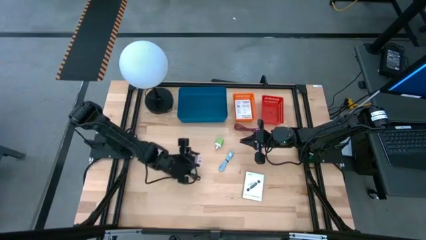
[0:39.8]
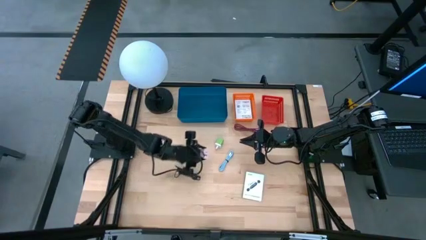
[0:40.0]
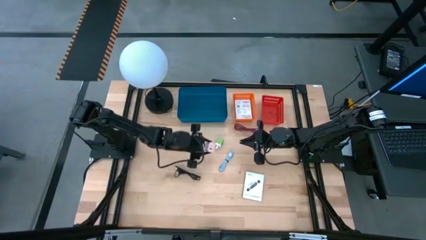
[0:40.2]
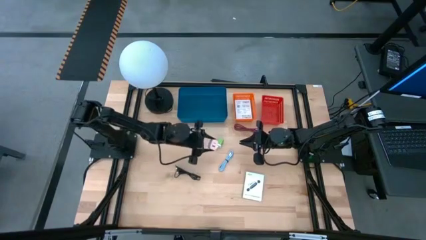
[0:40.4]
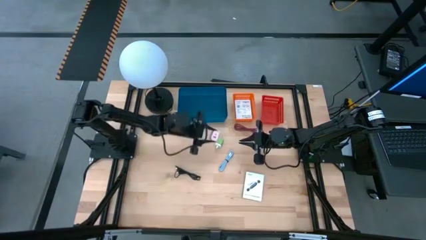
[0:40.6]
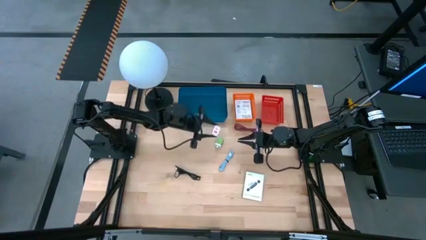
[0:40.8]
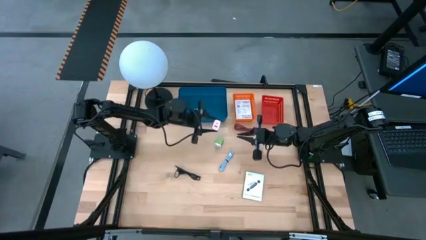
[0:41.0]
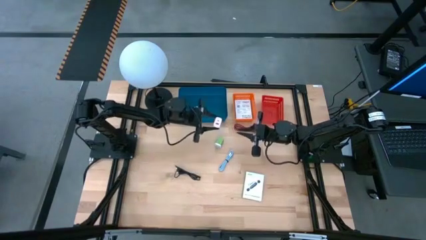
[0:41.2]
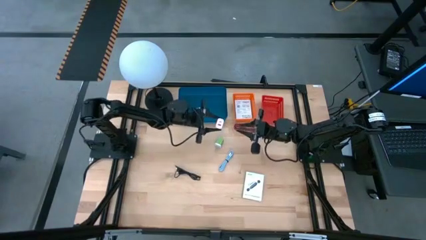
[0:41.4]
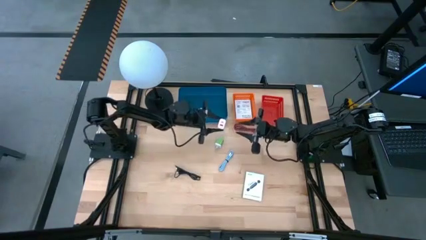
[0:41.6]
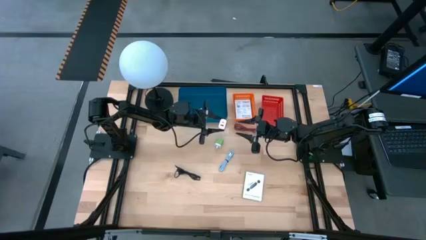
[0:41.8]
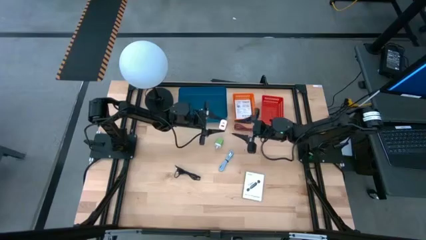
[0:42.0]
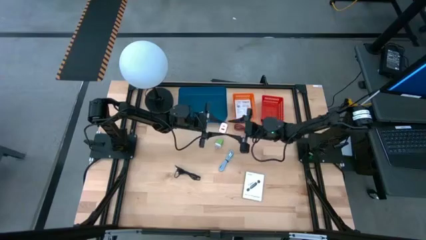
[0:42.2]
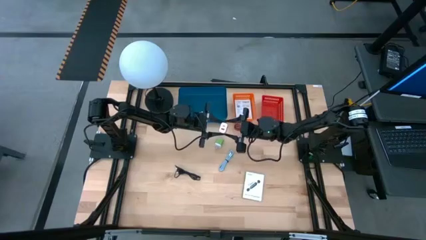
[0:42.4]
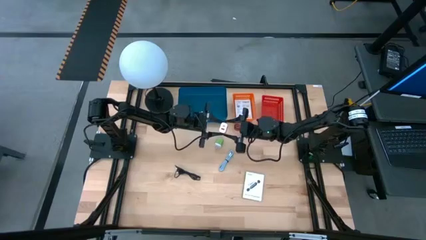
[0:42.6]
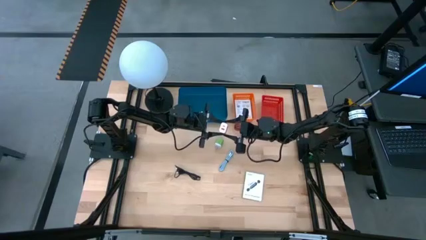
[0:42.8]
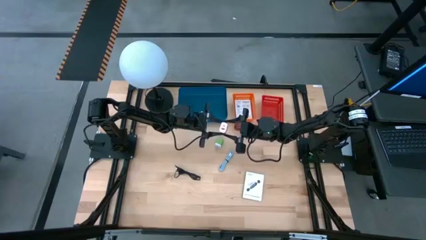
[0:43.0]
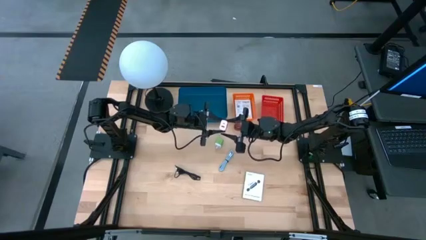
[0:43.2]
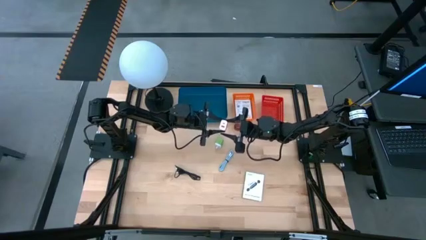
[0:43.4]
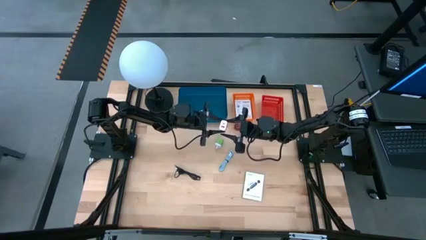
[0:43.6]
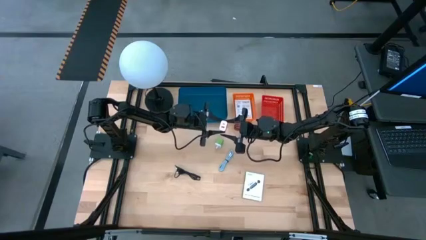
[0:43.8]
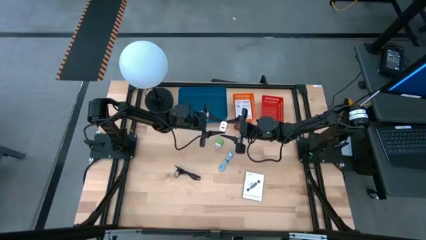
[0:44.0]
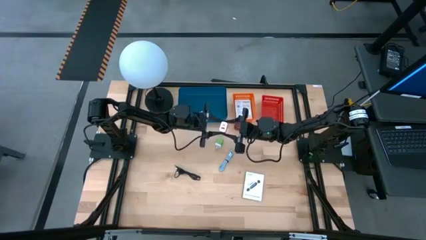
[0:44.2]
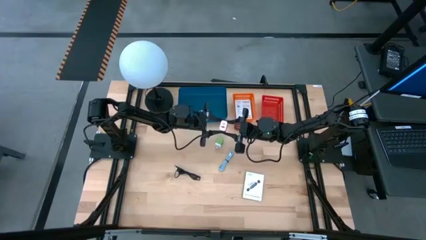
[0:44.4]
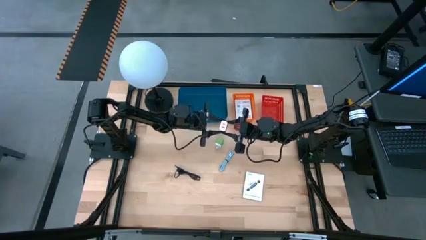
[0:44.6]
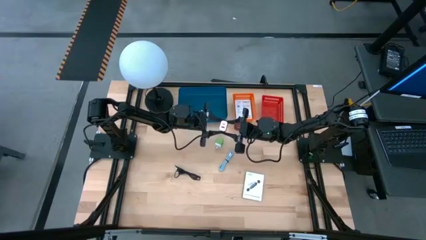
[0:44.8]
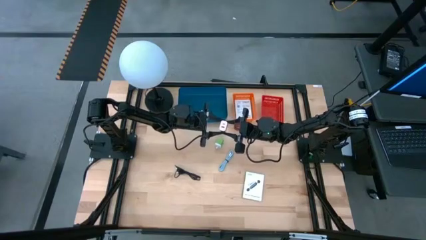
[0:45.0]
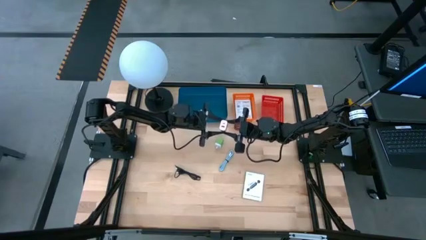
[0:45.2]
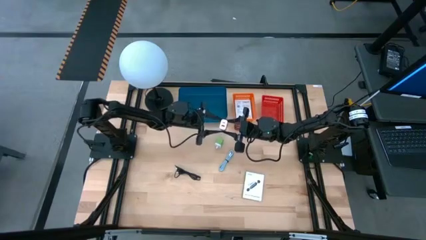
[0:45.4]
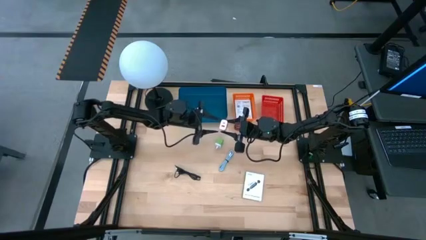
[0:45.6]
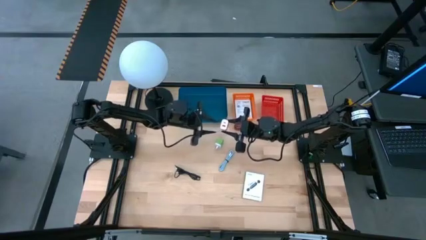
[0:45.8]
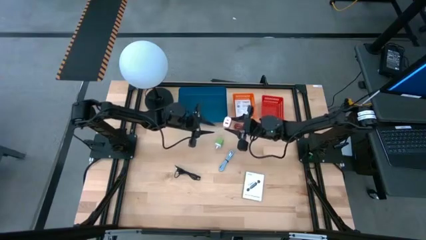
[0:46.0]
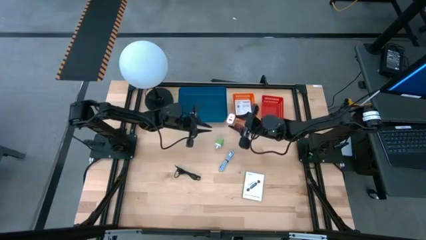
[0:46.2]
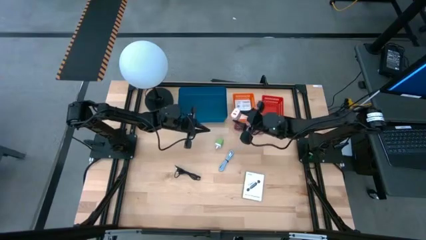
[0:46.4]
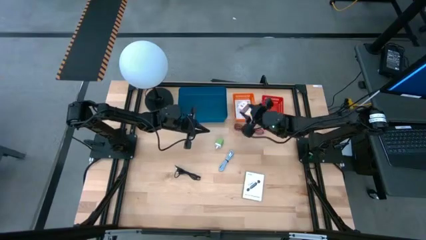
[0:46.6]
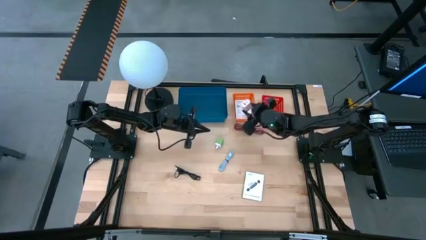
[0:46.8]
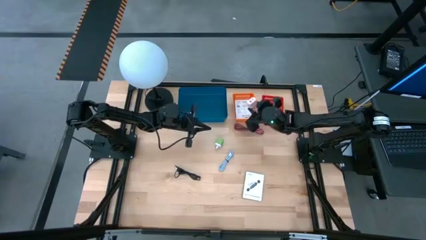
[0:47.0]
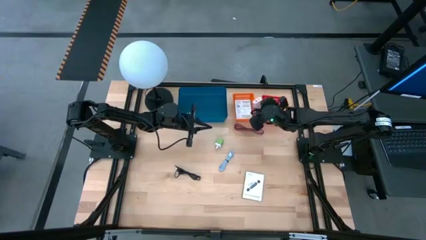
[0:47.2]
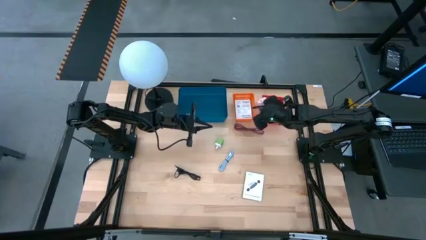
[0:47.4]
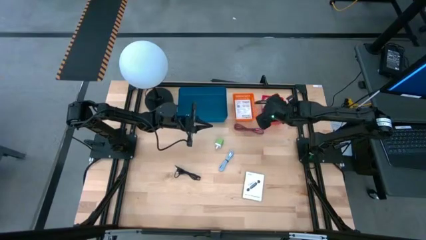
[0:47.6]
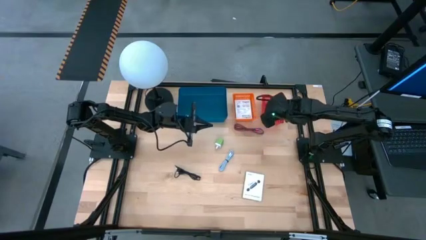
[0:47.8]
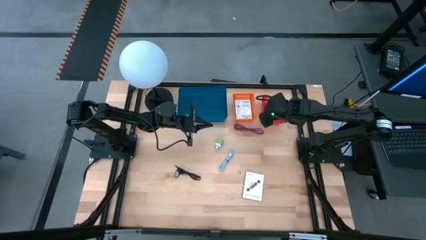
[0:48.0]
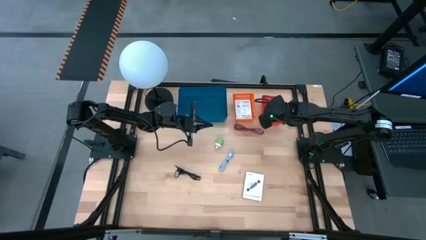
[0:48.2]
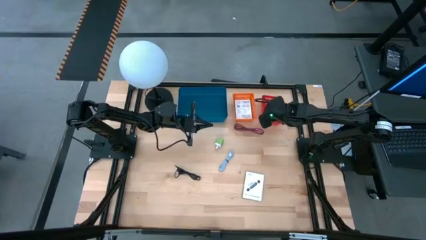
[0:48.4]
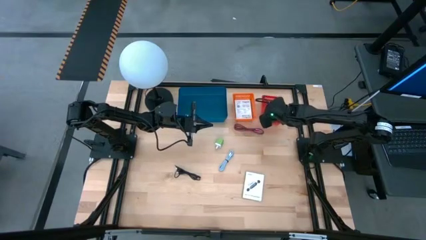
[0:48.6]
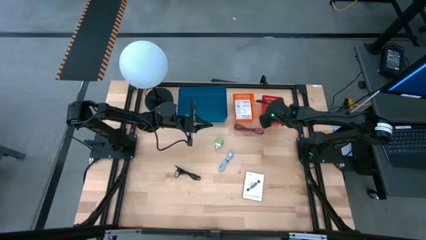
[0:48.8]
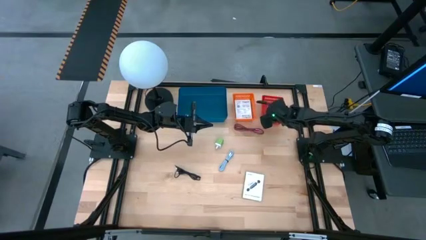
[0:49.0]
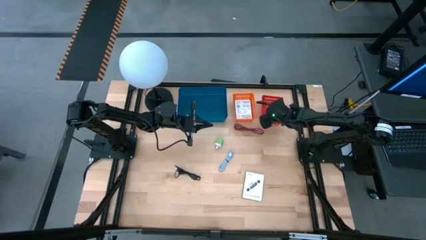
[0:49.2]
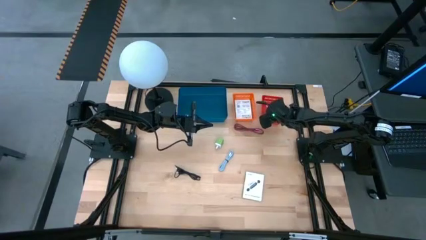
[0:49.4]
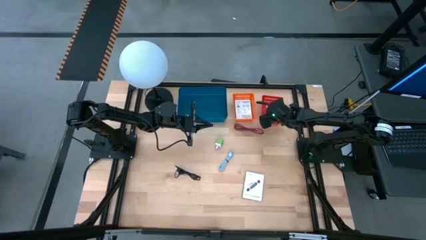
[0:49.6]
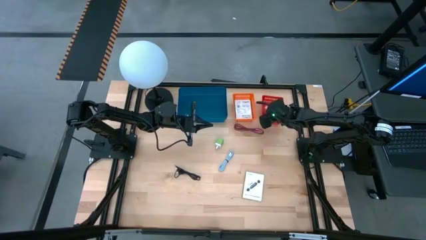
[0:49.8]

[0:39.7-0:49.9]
Task: Pick and place items into bin
Put the light pink charger adapter into the red bin

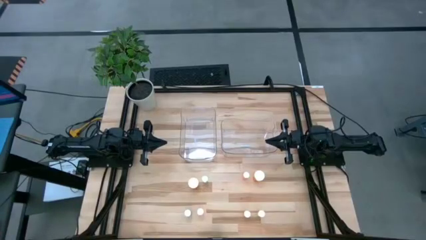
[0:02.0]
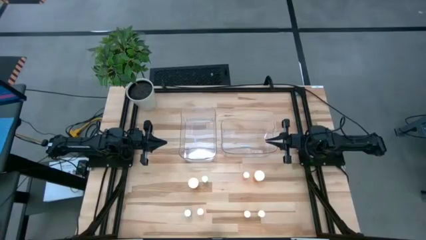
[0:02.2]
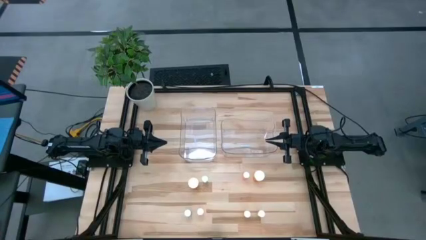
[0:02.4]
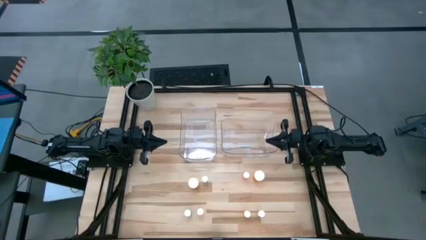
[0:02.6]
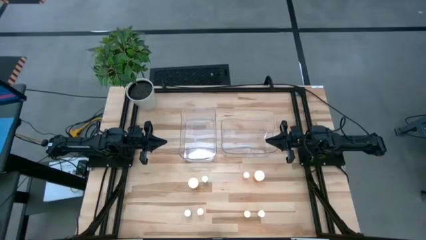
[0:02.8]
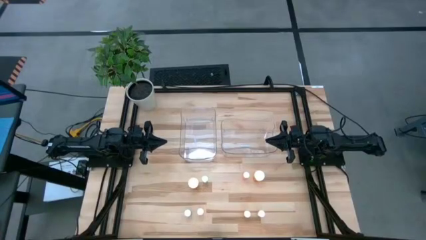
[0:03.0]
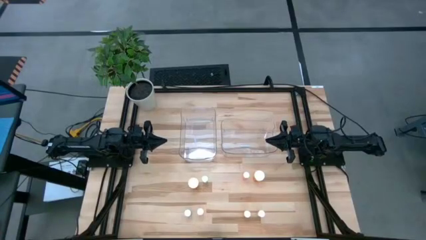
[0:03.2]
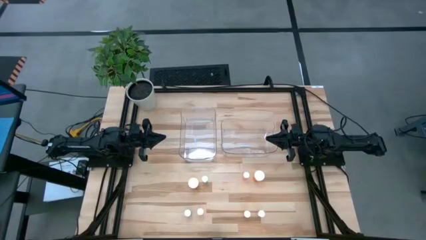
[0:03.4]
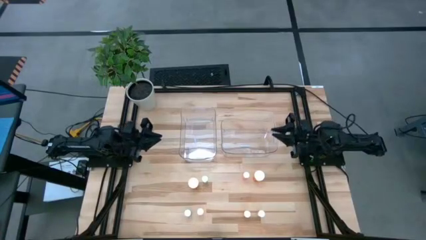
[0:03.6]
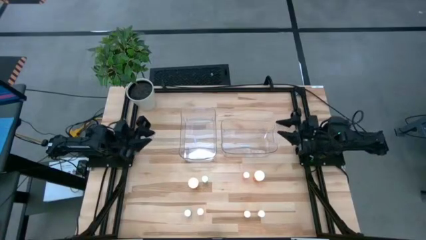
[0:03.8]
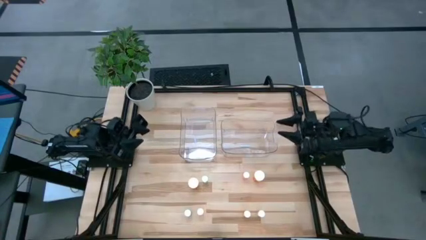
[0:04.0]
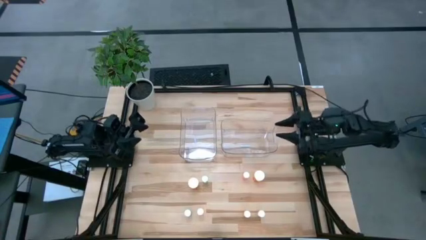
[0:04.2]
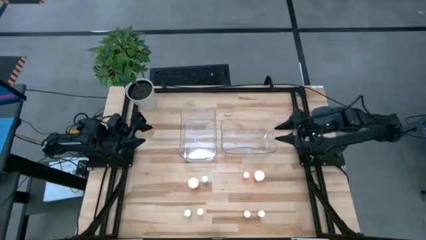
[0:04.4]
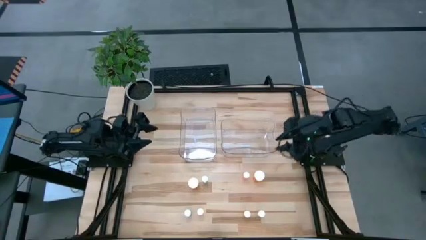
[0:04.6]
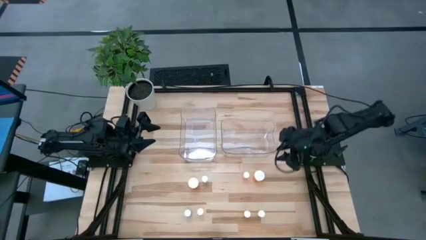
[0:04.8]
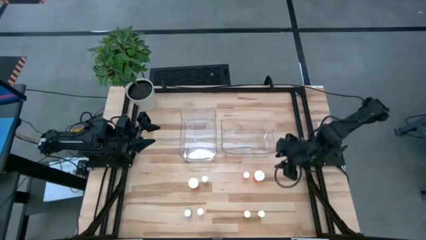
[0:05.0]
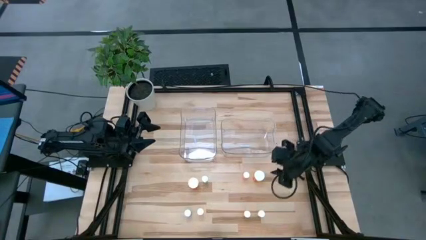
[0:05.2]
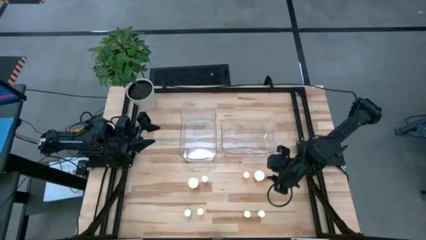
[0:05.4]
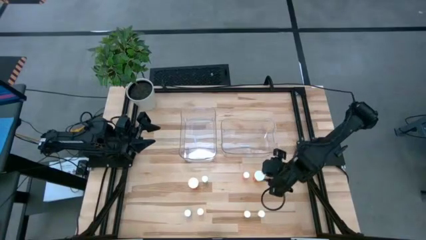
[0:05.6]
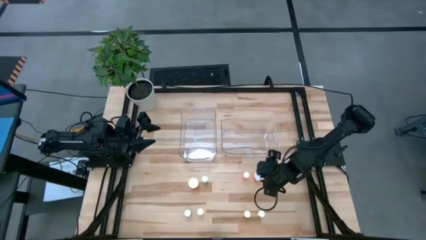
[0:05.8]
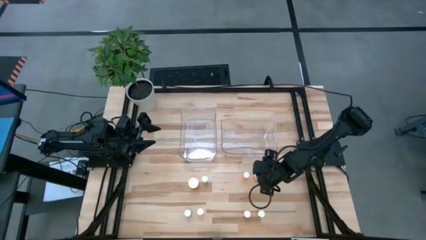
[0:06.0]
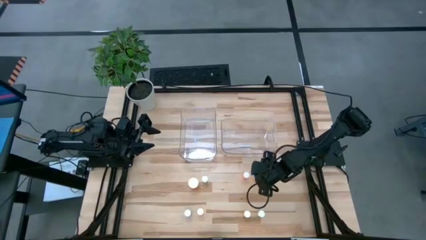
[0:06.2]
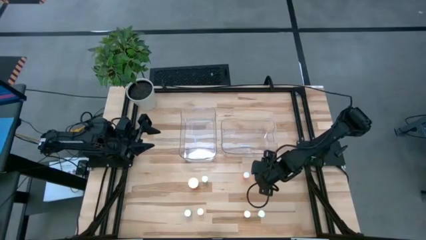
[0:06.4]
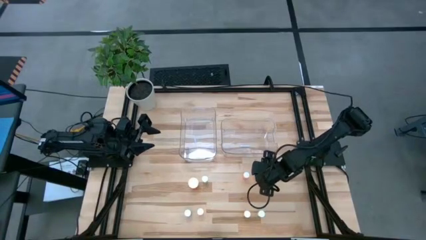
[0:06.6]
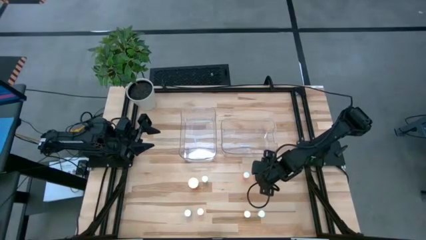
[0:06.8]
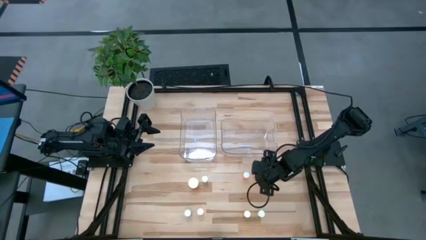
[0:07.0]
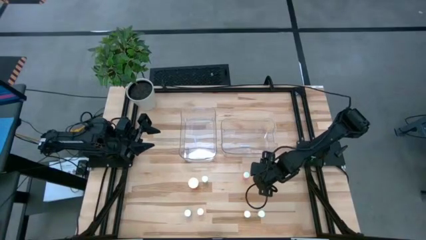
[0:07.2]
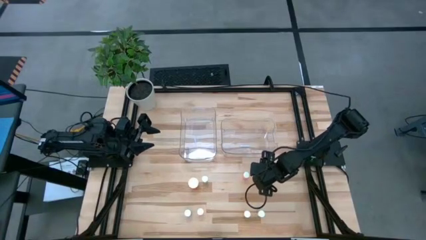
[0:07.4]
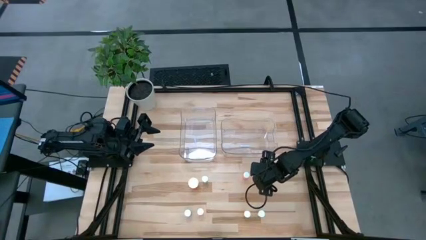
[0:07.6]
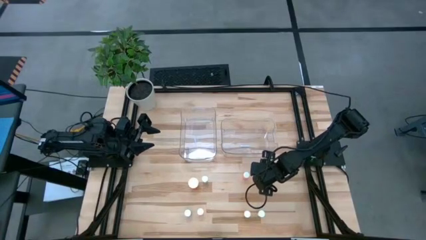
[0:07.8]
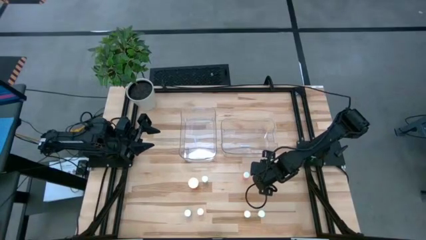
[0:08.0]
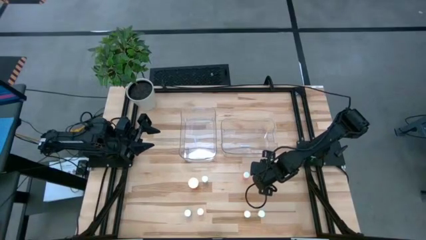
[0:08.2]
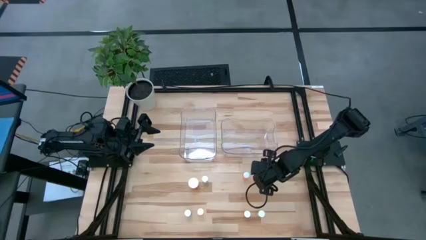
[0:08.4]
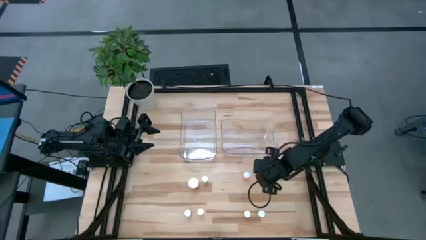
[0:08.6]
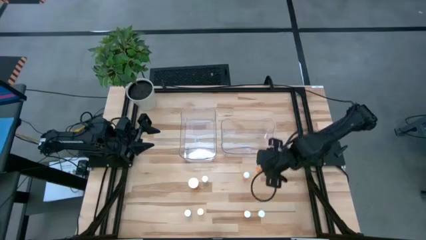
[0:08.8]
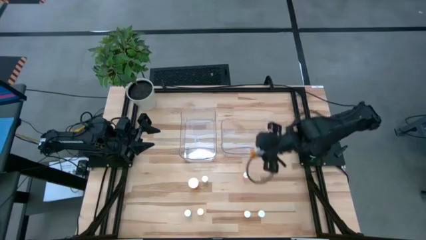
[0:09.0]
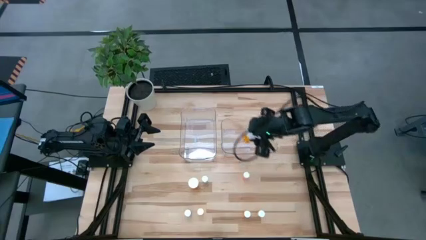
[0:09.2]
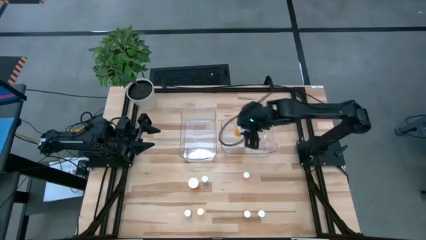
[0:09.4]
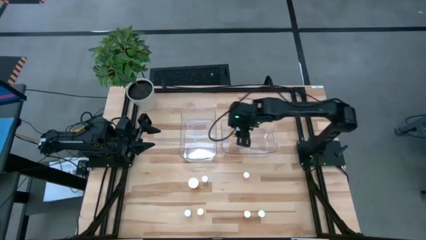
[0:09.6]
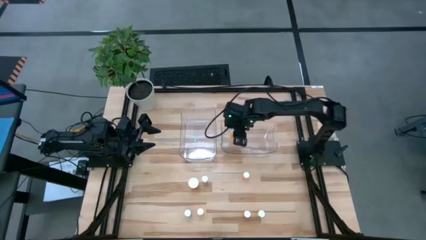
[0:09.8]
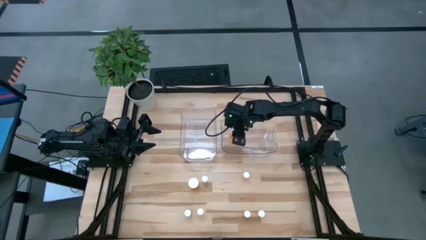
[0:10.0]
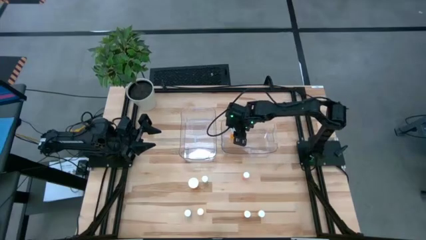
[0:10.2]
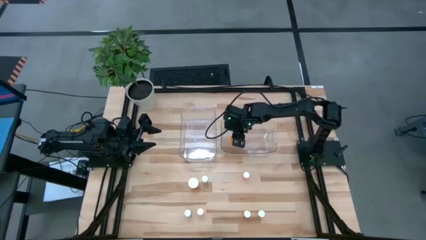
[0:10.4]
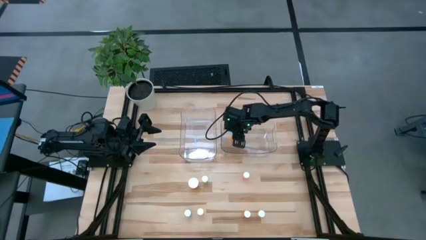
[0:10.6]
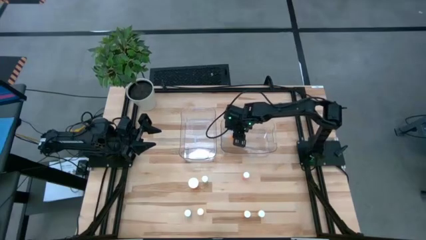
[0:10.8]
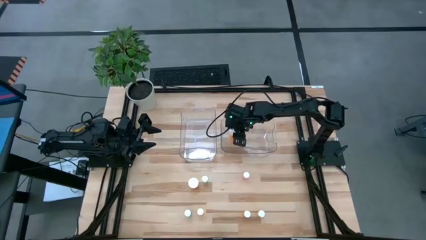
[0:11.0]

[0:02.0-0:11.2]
Task: Pick and place medicine bottles into bin by pill shape (circle, oval)
Put the right big orange pill bottle into the right transparent bin
